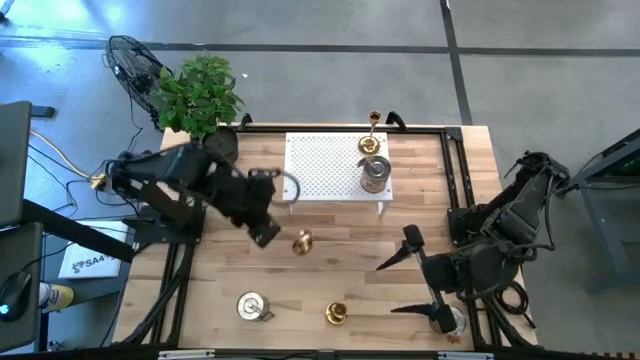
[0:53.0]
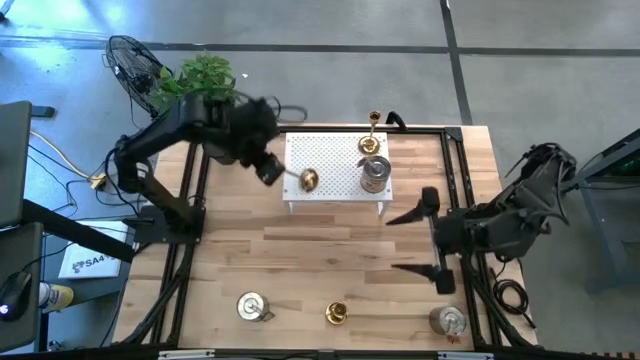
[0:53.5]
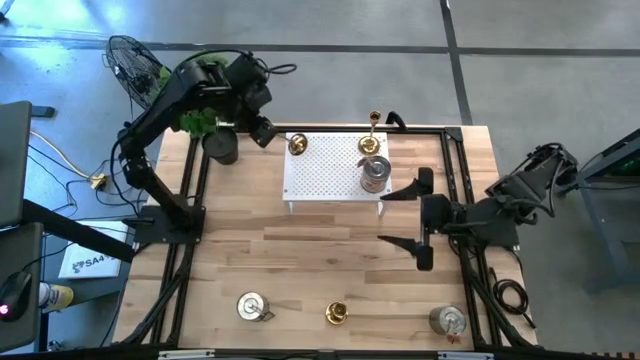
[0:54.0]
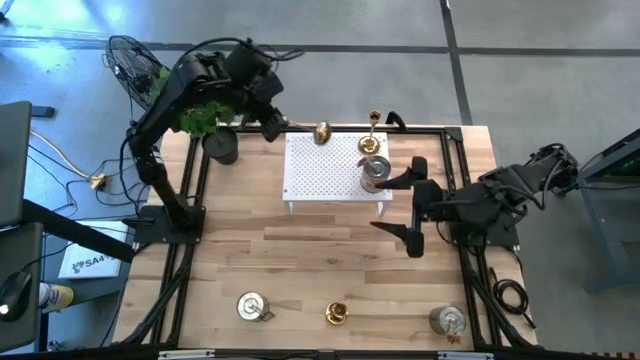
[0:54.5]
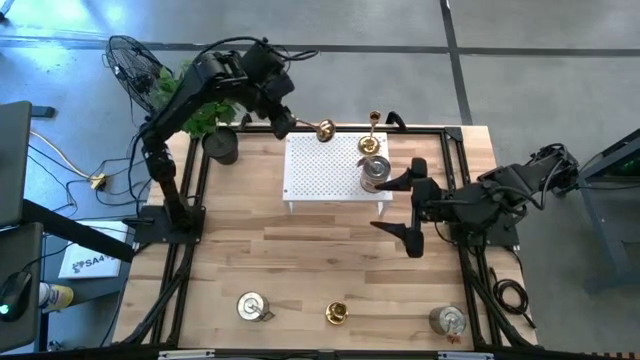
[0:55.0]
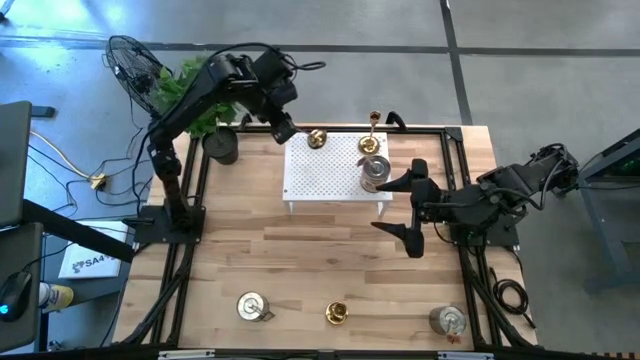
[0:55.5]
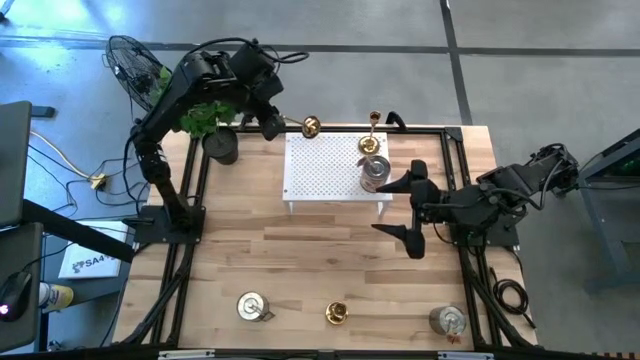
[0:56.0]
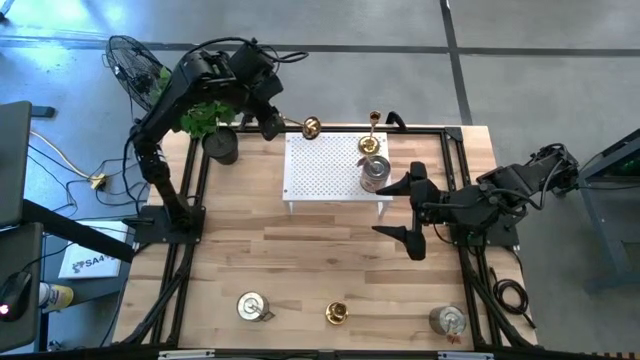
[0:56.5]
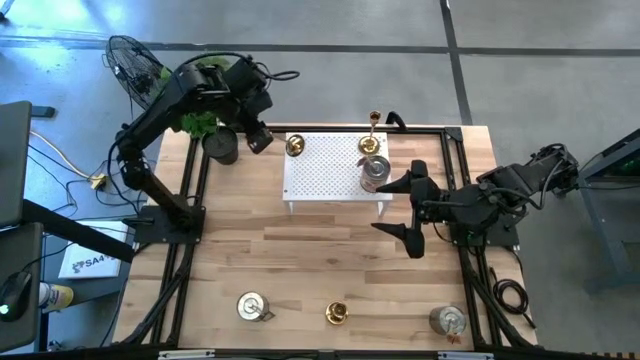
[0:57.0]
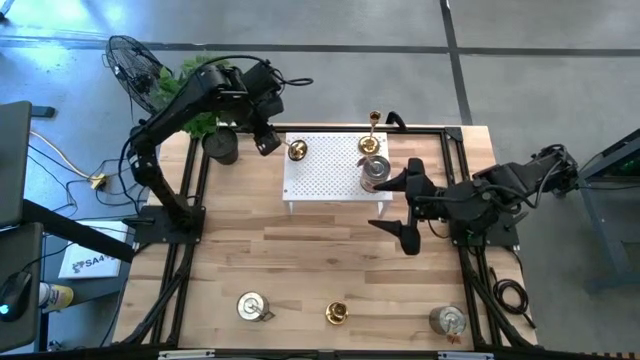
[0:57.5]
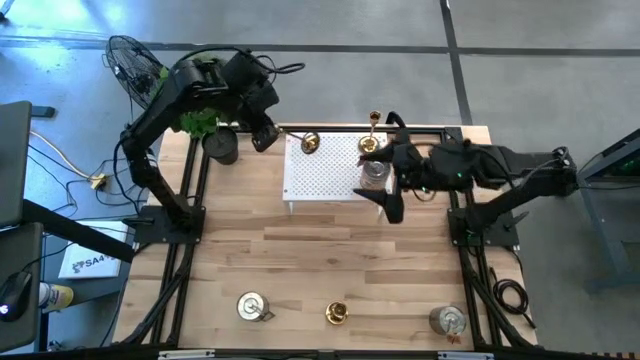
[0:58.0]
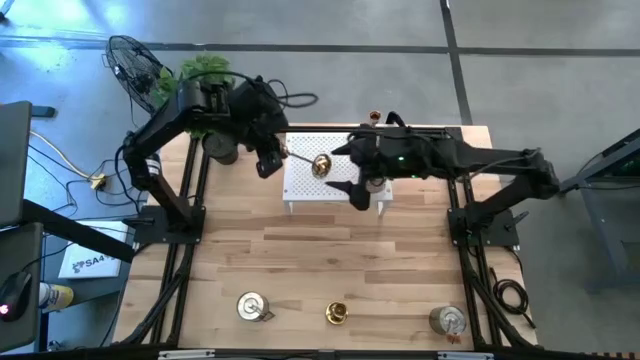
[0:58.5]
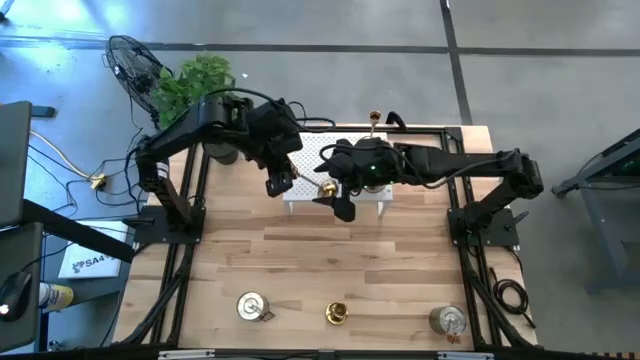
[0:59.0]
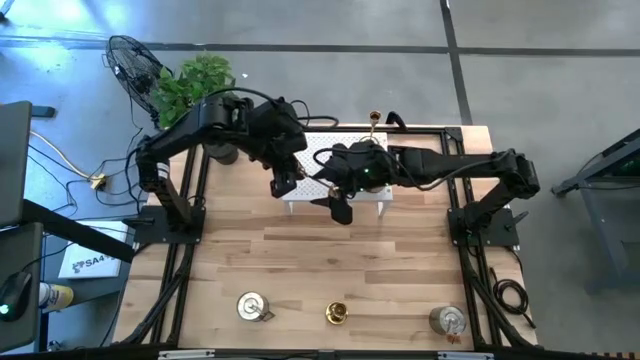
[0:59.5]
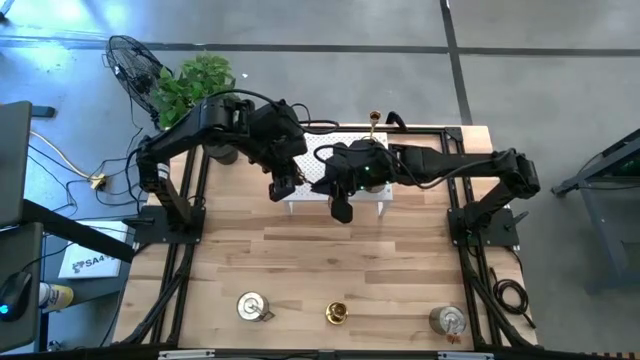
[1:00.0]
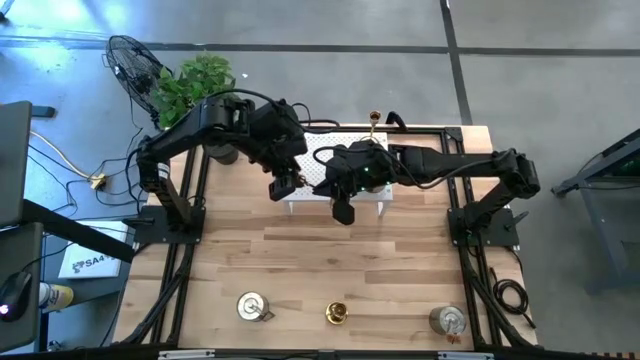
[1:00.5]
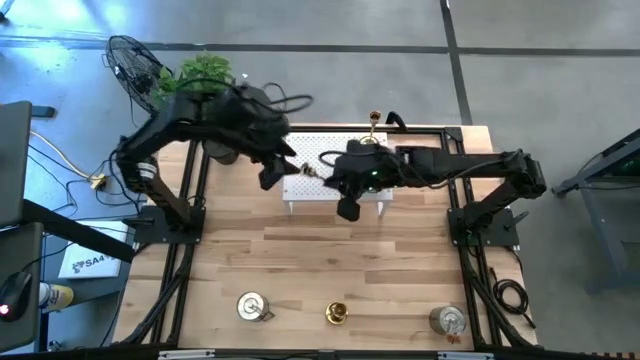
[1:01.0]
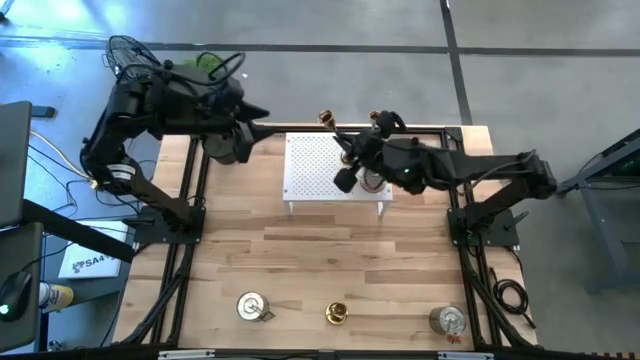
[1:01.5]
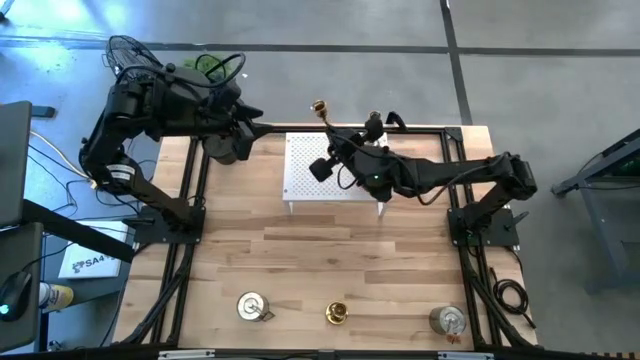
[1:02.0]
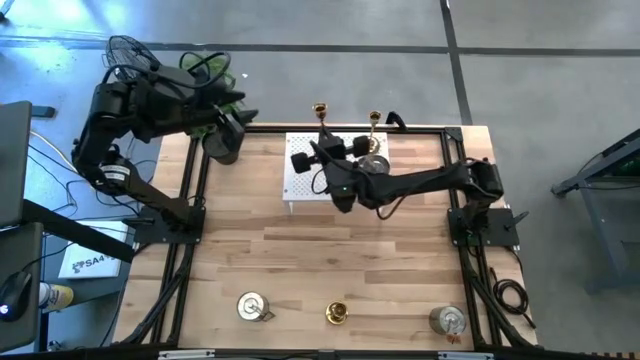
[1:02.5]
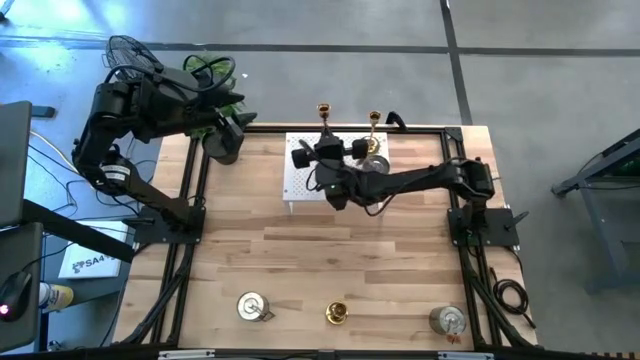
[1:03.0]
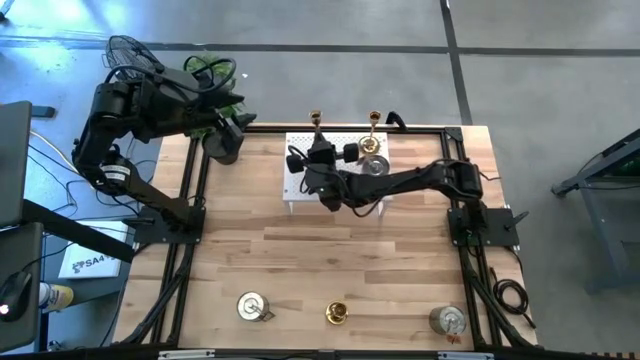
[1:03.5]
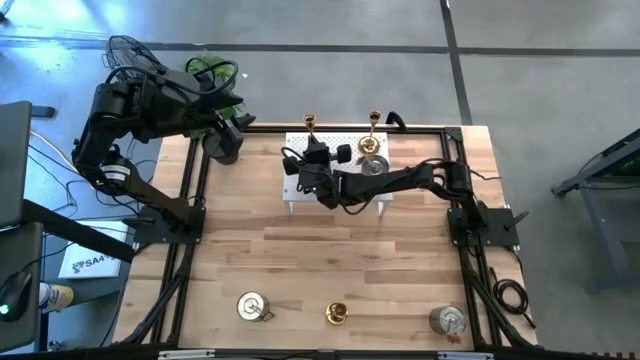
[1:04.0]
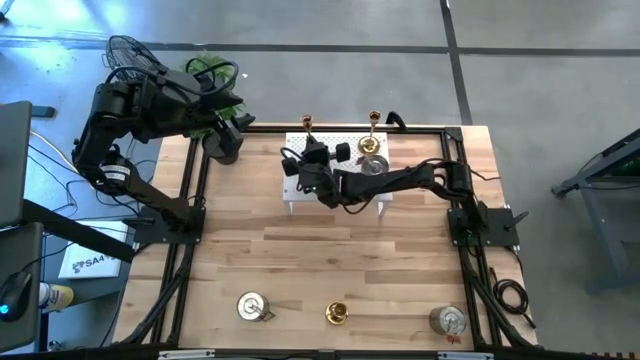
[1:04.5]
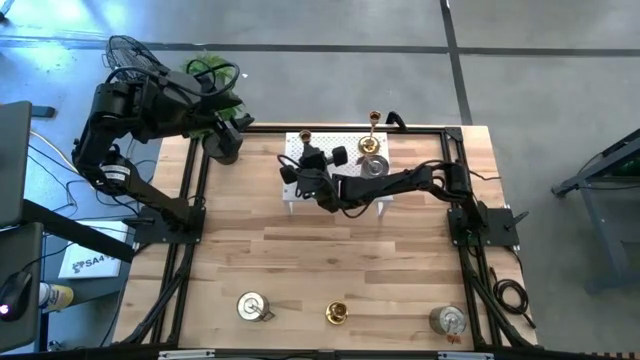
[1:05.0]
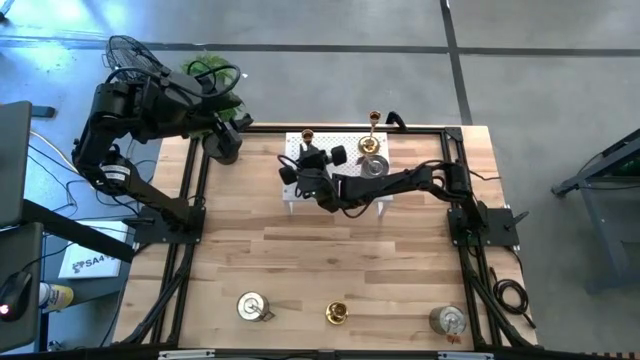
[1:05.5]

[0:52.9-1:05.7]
Task: Pick & Place candle stick holders
Put the left gold candle holder on the shelf

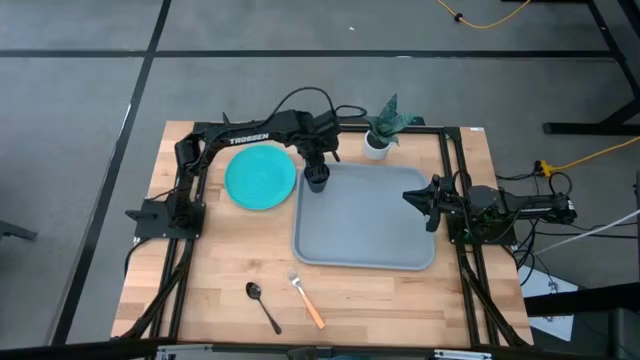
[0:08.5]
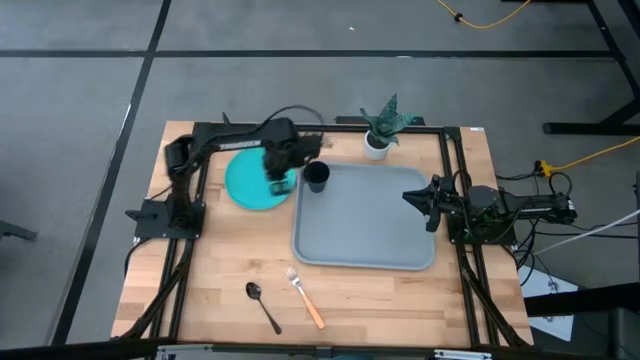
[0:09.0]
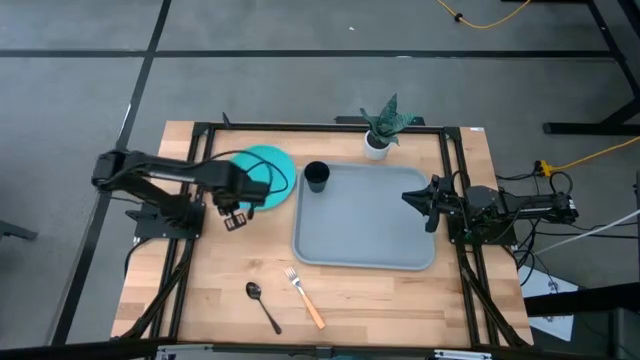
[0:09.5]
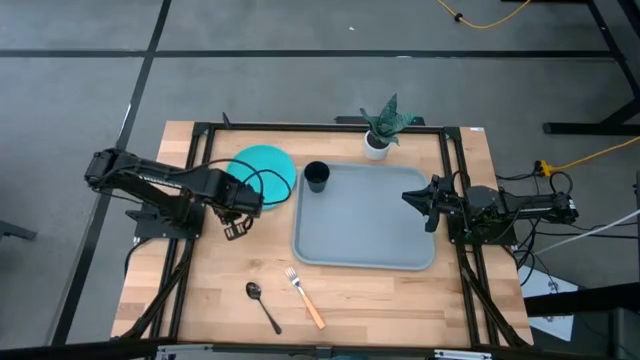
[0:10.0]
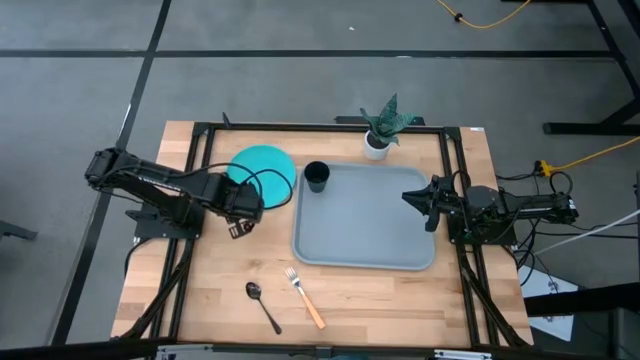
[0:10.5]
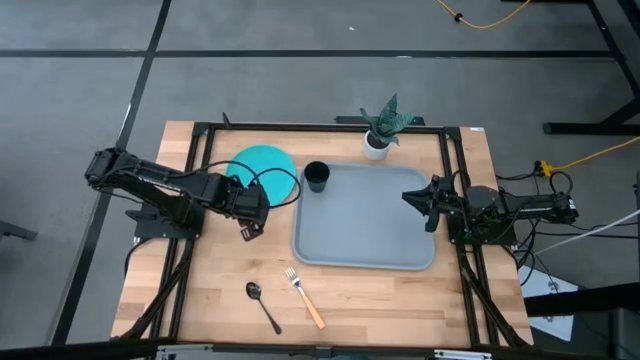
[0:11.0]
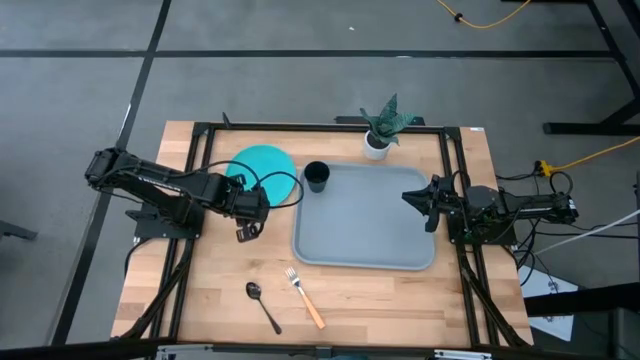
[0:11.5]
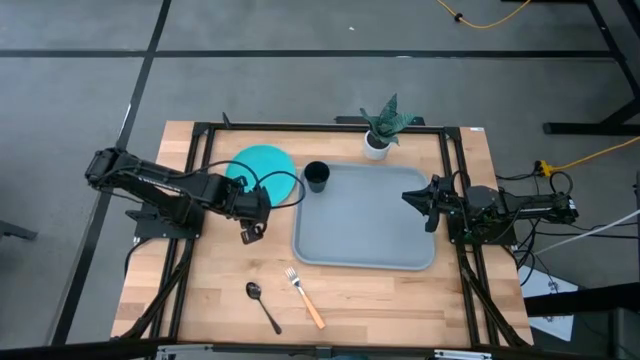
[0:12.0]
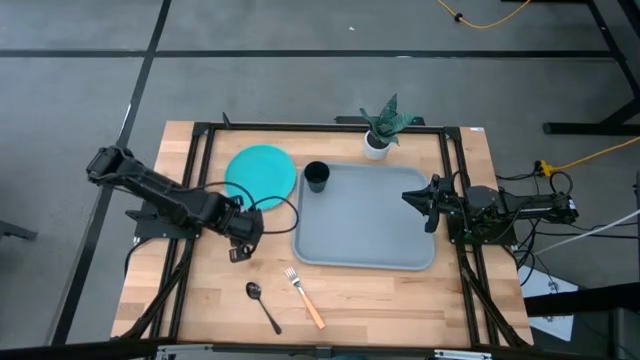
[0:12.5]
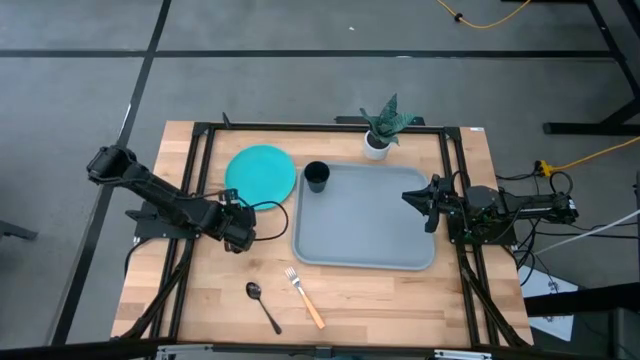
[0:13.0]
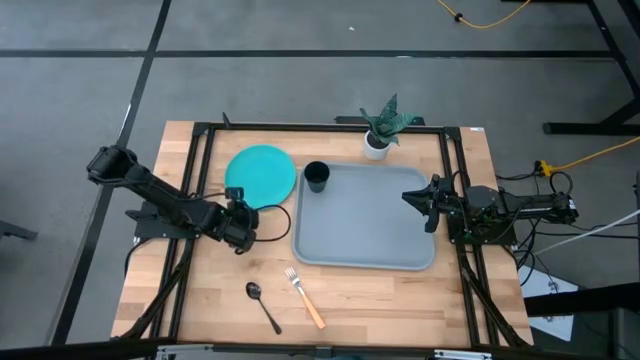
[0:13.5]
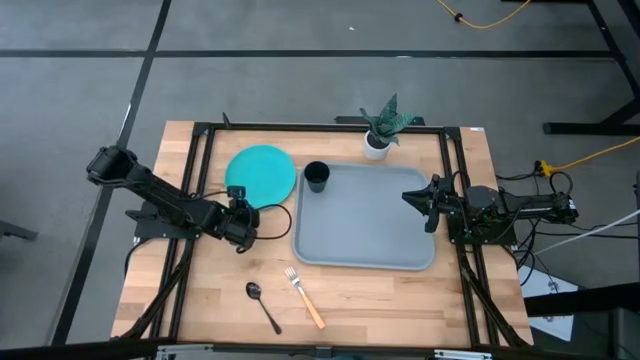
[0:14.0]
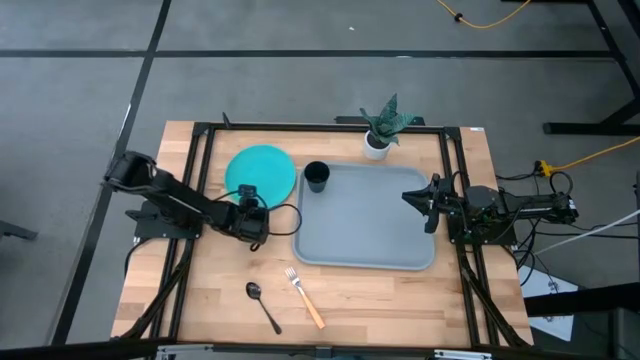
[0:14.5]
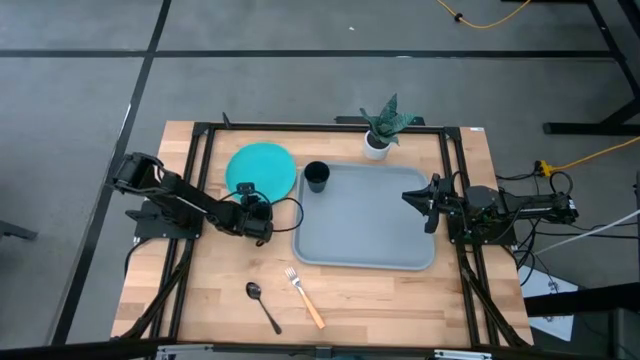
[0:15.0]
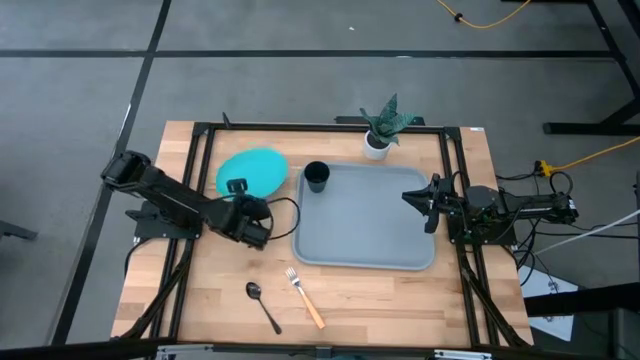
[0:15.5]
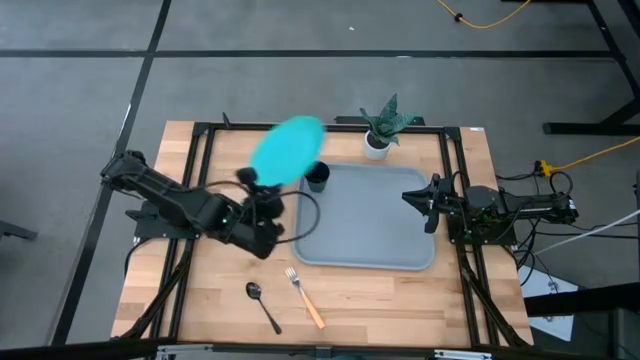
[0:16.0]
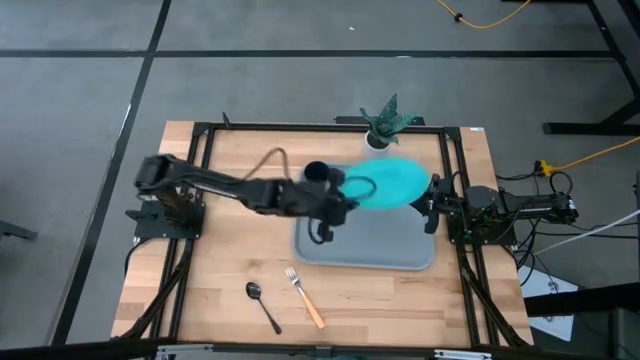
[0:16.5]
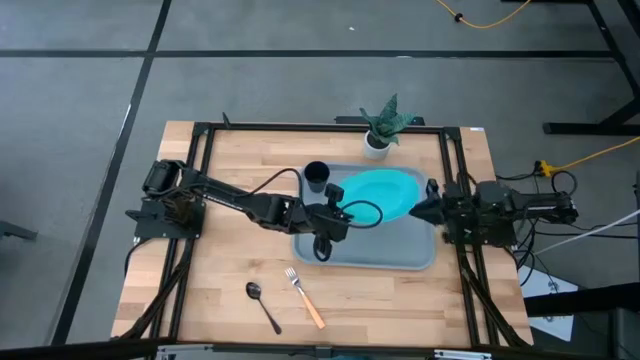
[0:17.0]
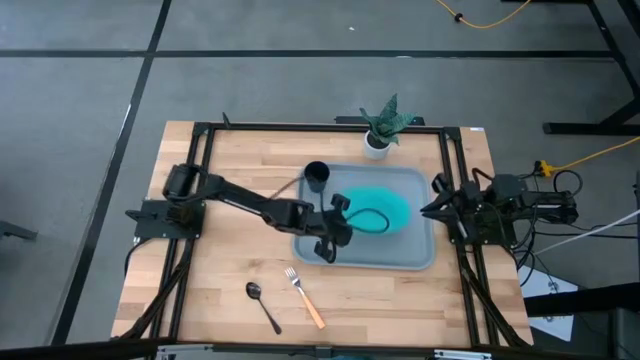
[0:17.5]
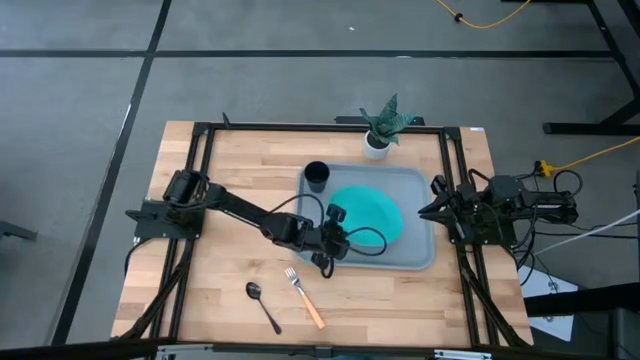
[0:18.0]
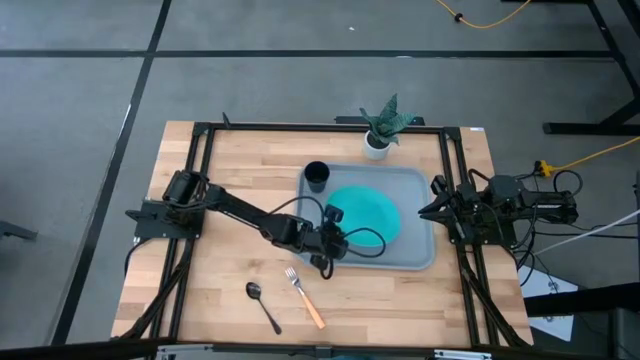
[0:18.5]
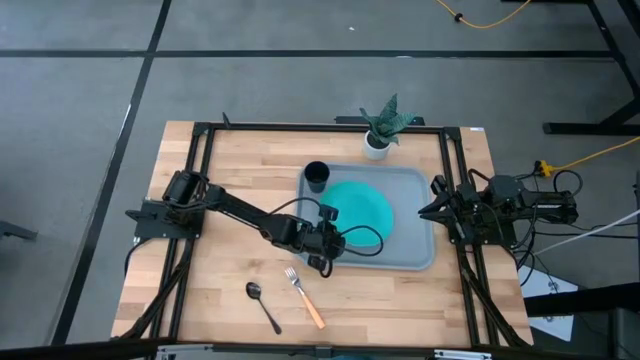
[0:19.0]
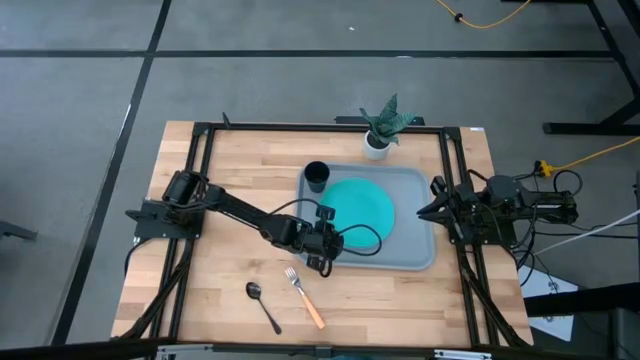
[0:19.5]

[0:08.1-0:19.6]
Task: Pick and place plate/cup/fork/spoon on tray
Put the blue plate on the grey tray to the bottom right of the black cup
